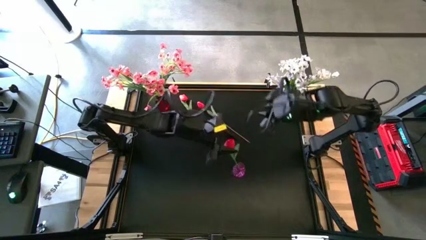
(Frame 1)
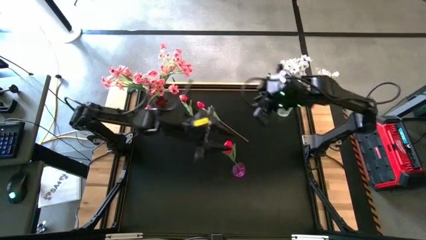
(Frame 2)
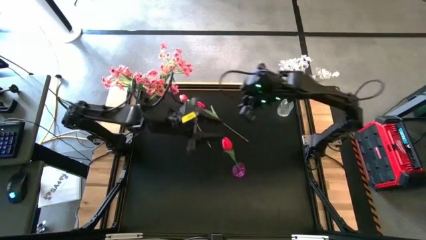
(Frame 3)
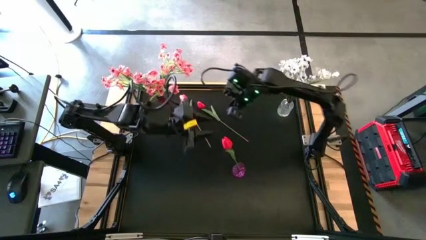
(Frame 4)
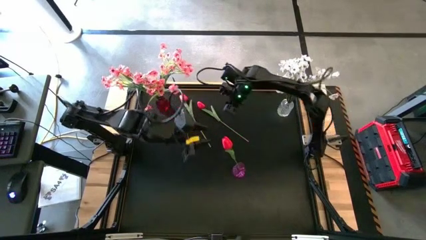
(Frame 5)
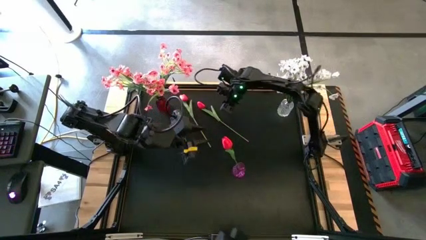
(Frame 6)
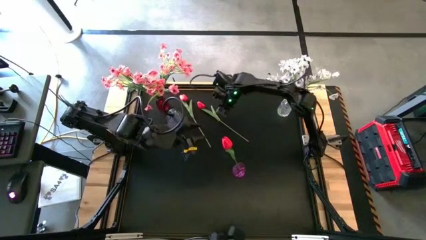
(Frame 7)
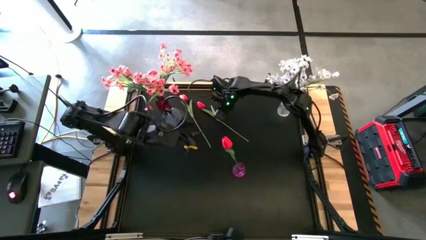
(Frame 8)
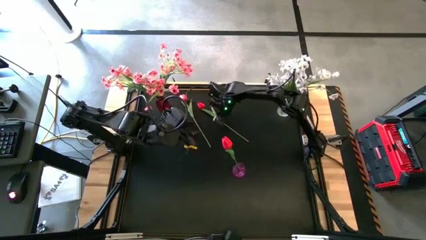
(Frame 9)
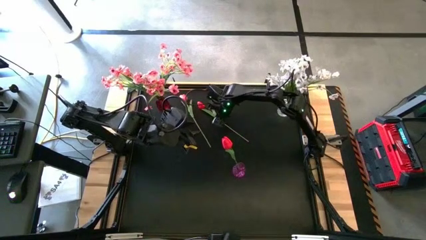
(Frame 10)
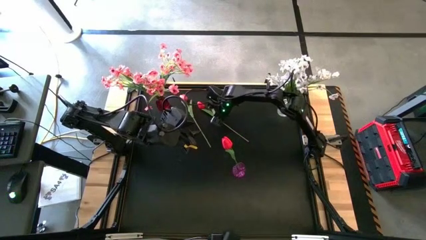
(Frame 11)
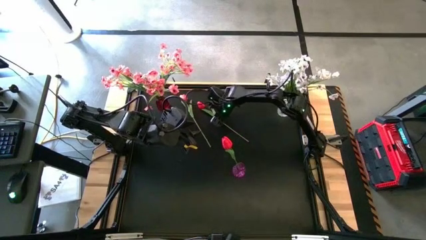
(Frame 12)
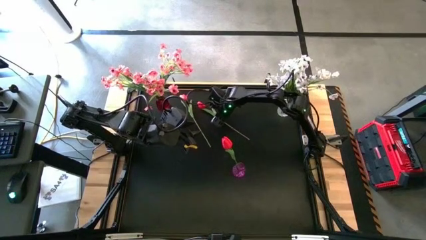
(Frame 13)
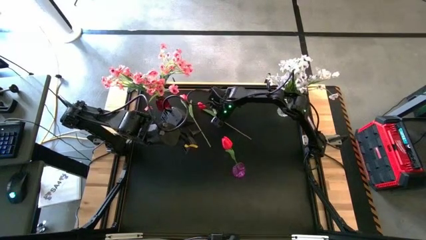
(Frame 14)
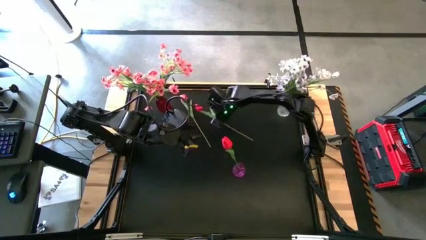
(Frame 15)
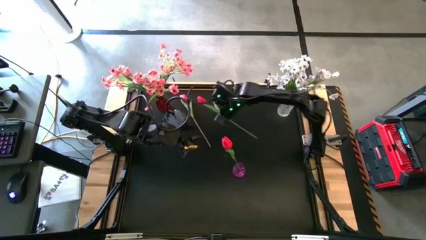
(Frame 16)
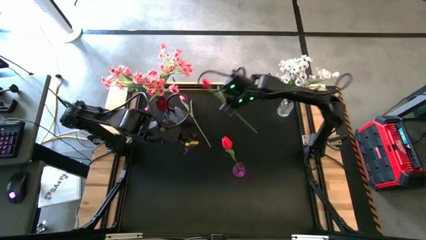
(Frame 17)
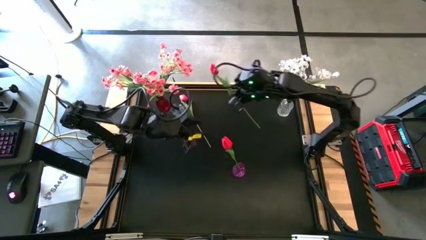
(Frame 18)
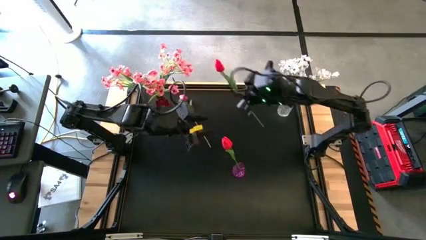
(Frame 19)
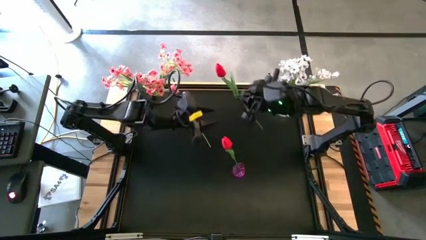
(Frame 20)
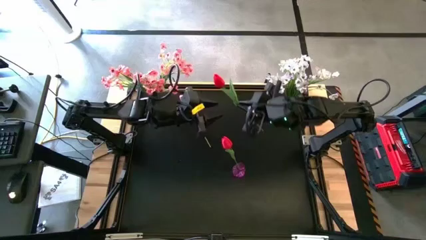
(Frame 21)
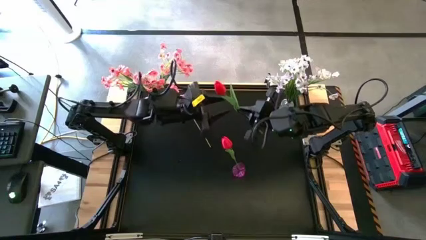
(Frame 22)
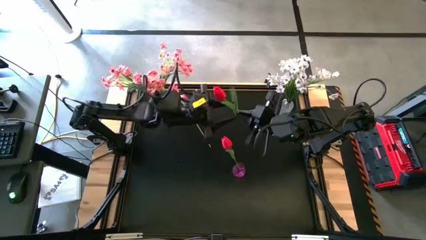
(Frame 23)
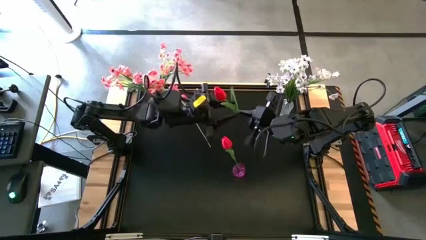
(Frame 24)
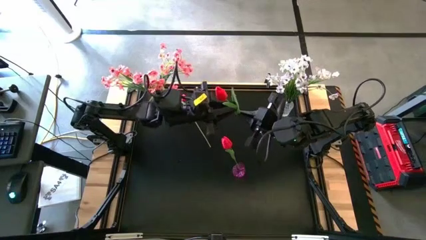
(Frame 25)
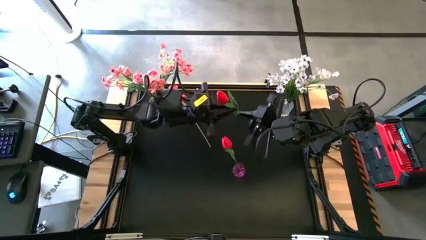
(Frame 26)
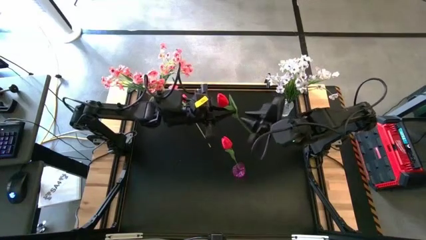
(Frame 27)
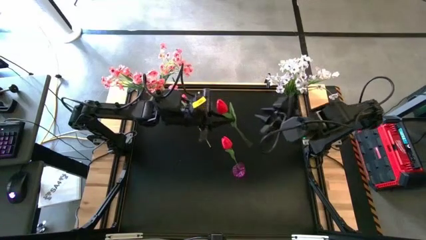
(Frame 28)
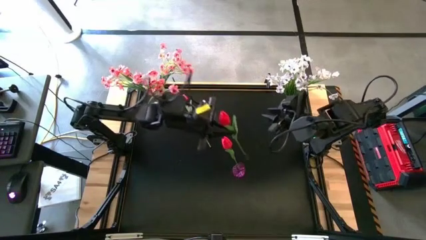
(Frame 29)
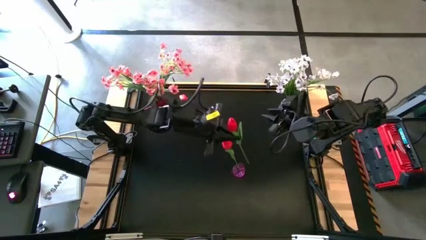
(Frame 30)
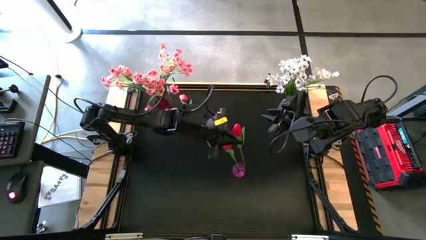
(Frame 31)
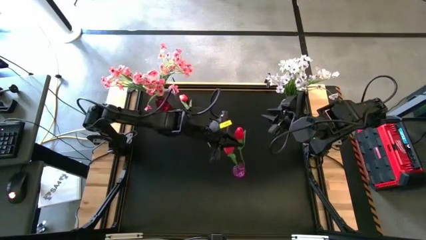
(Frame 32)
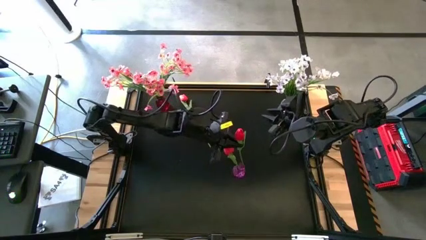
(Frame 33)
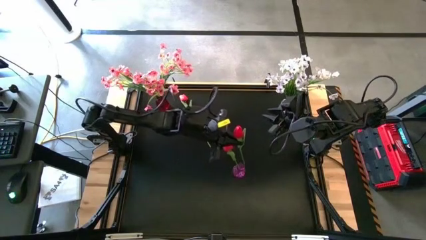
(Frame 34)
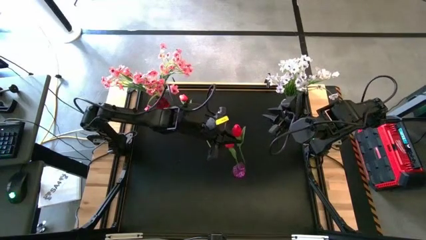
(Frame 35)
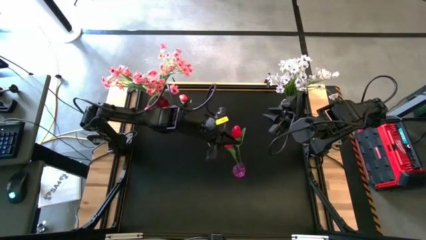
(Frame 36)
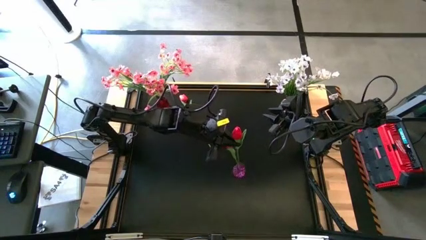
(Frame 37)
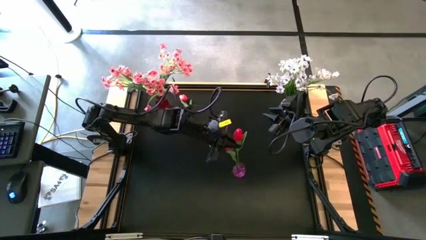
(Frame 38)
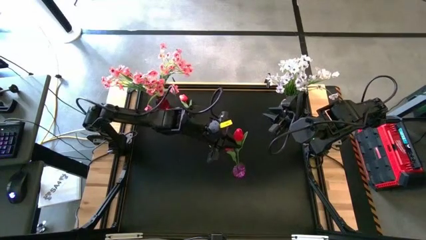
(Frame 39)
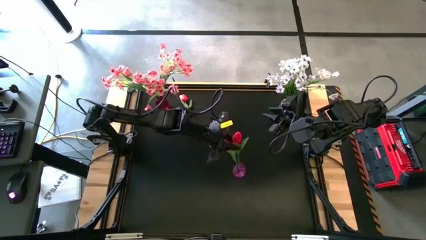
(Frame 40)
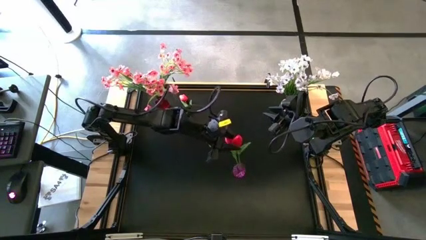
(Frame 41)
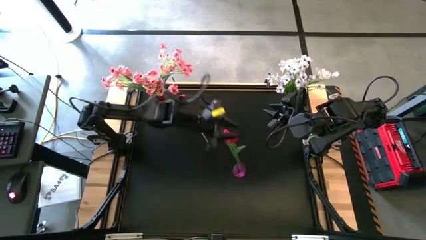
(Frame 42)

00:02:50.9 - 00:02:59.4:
Task: Sort flowers into vase by color
Put the right red tulip into the purple flower vase

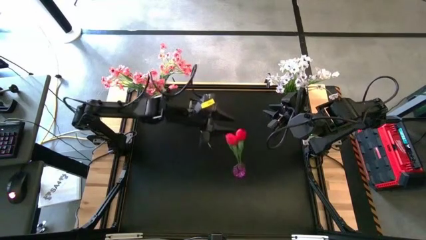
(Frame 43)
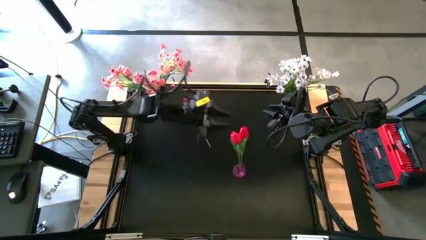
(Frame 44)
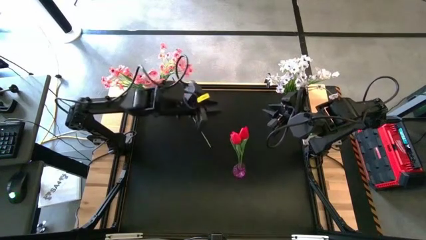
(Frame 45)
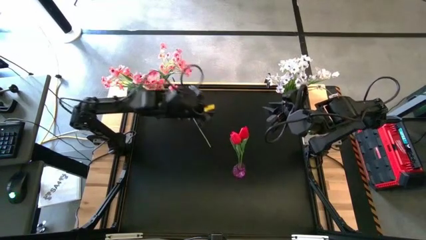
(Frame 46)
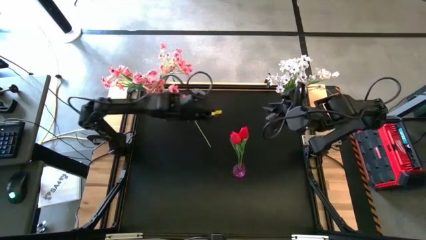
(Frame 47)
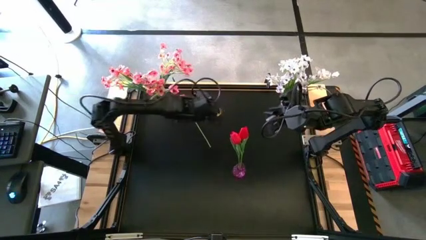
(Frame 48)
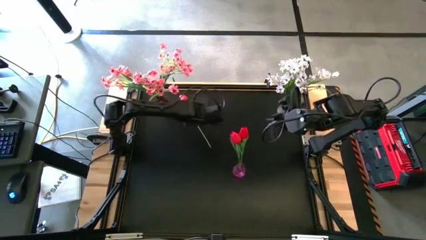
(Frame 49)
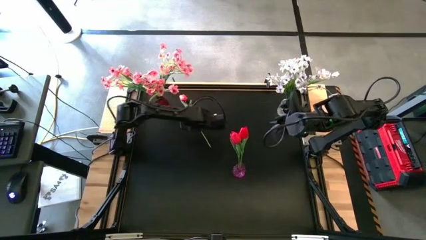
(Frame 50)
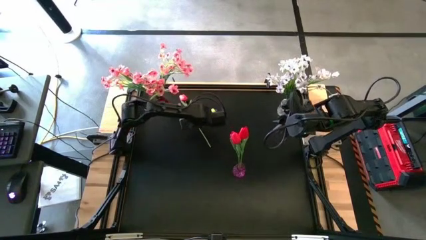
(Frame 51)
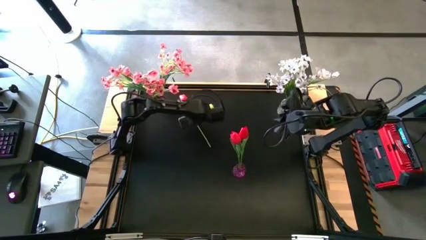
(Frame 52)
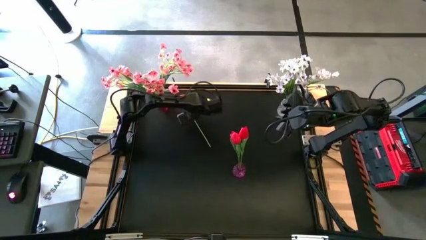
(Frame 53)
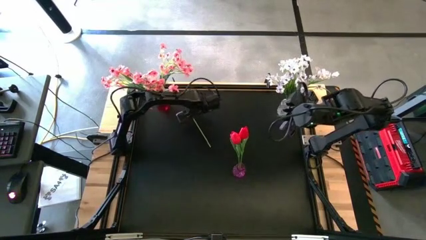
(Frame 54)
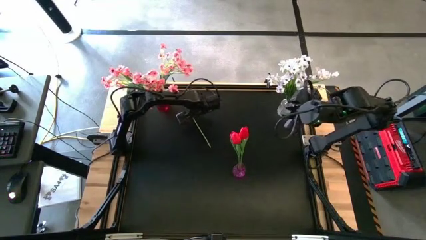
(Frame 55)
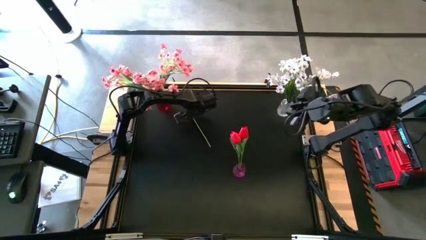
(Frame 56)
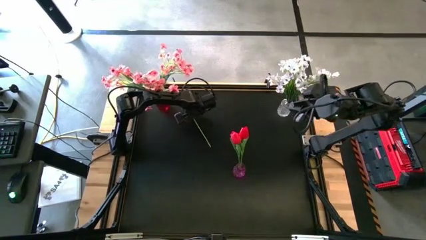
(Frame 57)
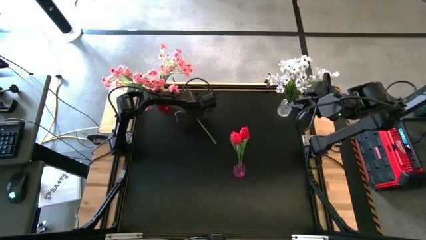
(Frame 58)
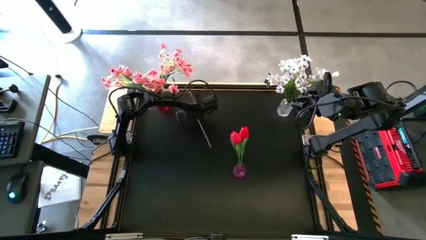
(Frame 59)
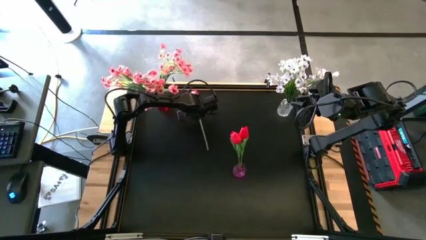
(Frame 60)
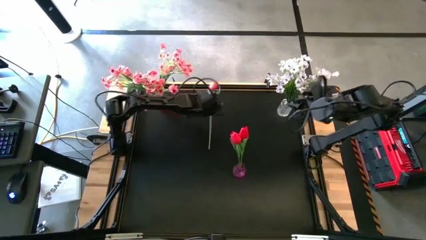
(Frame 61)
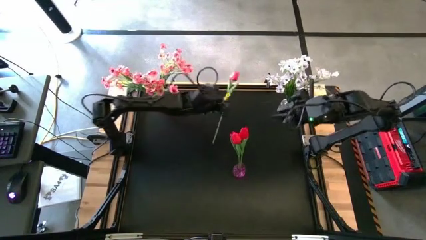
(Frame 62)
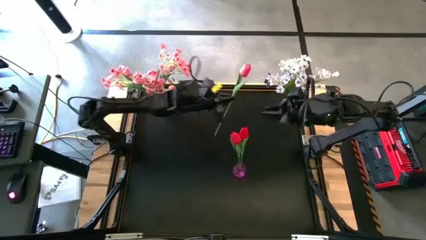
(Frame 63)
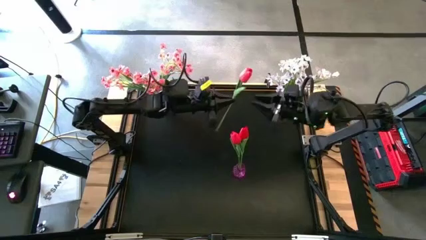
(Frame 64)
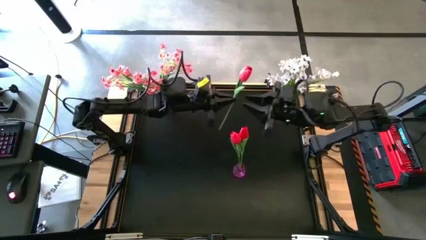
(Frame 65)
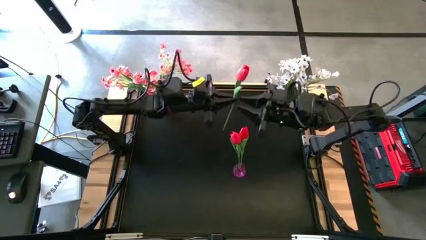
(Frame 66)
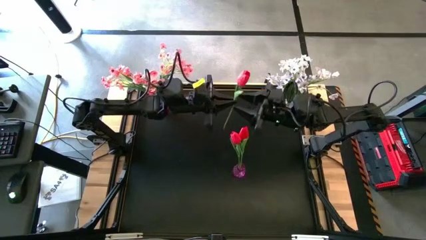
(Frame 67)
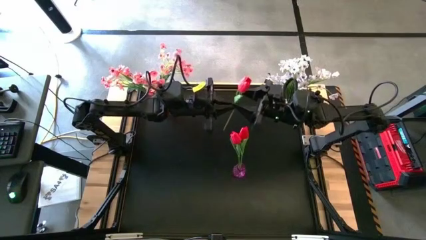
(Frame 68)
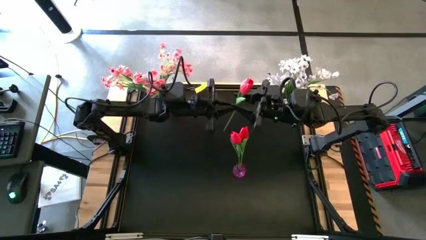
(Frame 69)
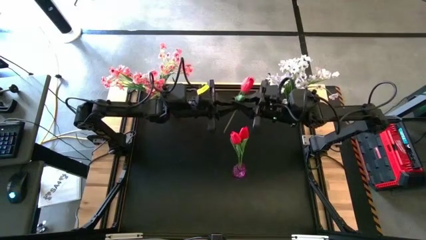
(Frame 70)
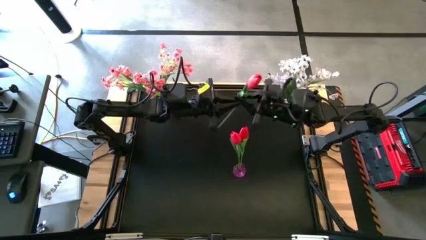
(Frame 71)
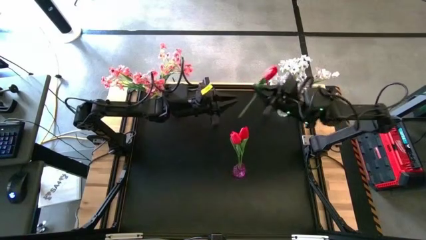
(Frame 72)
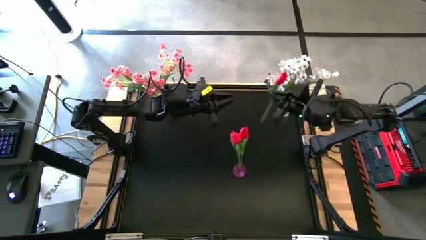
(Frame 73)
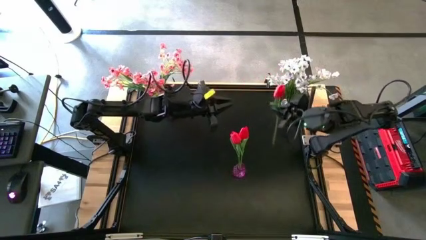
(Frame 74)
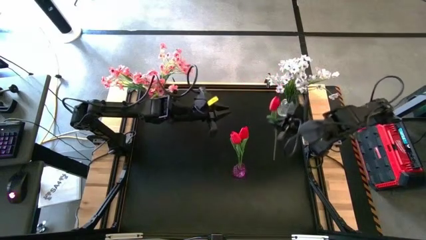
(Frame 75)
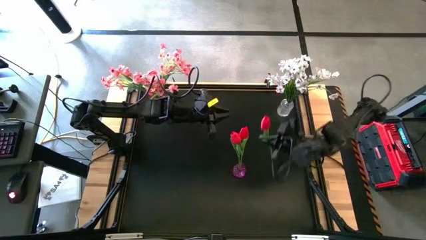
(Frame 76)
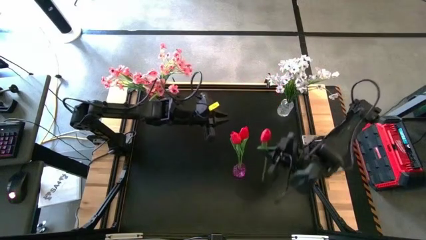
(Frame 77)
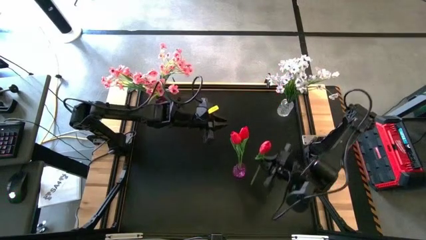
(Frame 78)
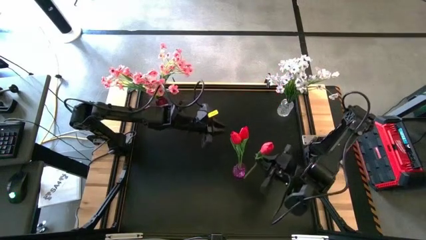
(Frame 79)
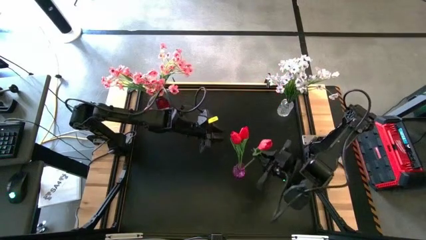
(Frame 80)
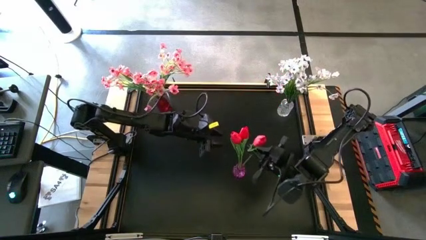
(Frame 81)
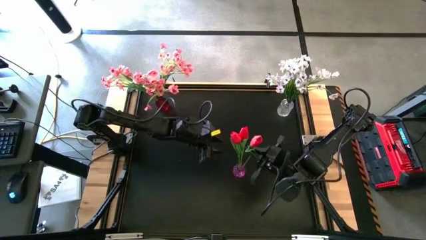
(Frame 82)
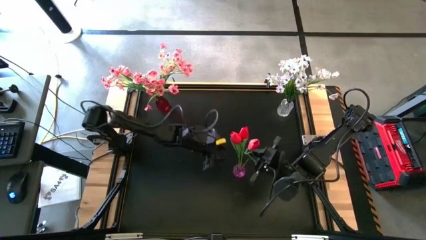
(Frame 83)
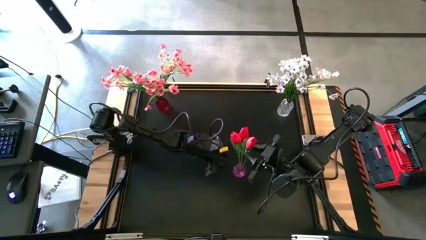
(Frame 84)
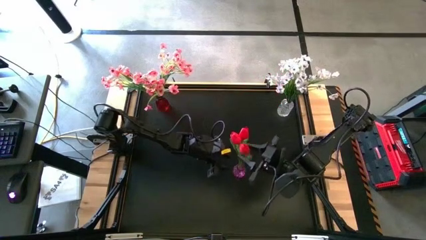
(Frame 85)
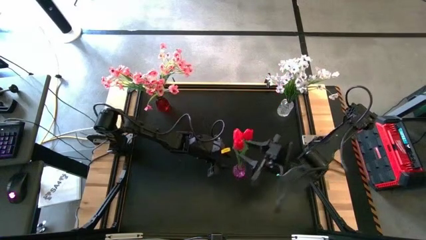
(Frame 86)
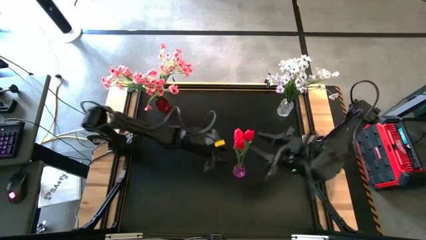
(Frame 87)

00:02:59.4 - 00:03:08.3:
Put the red tulip into the purple flower vase
